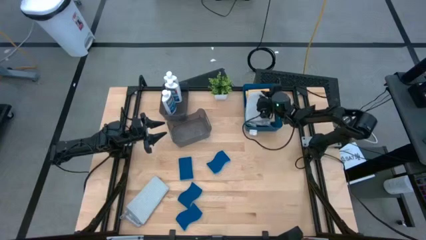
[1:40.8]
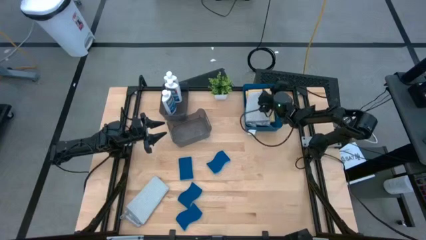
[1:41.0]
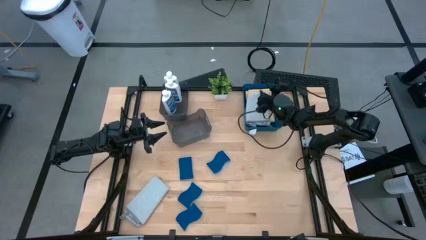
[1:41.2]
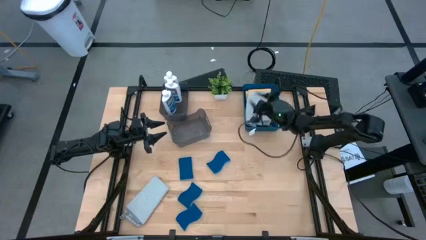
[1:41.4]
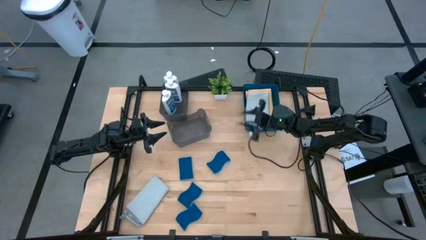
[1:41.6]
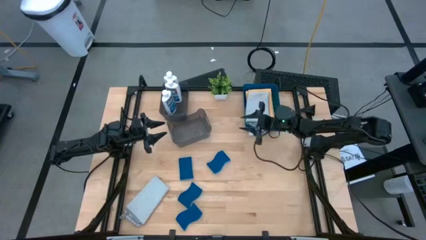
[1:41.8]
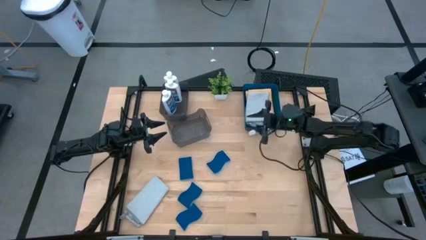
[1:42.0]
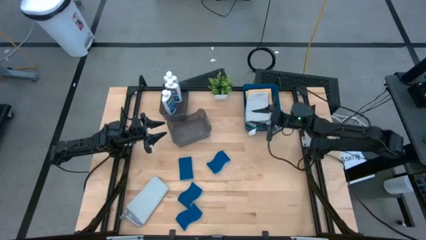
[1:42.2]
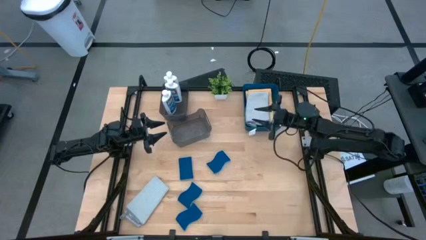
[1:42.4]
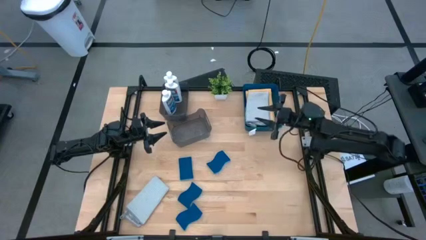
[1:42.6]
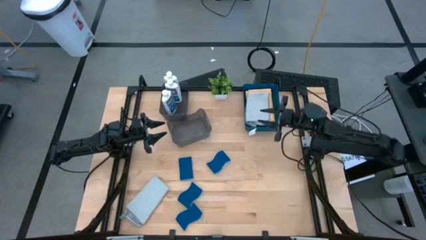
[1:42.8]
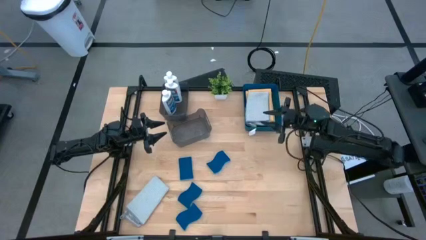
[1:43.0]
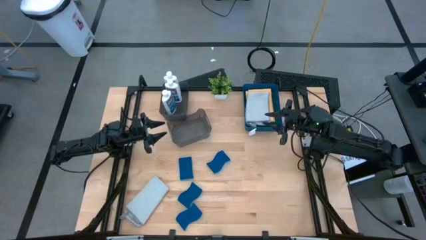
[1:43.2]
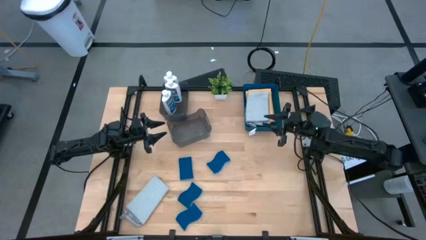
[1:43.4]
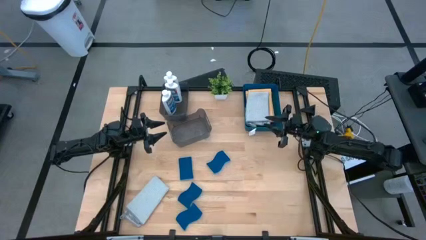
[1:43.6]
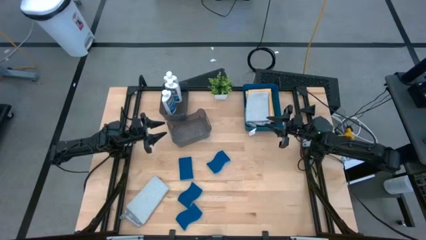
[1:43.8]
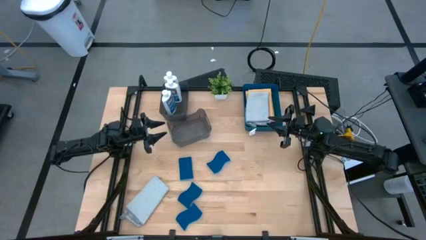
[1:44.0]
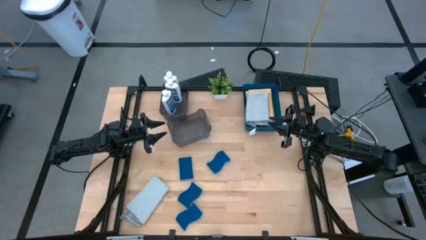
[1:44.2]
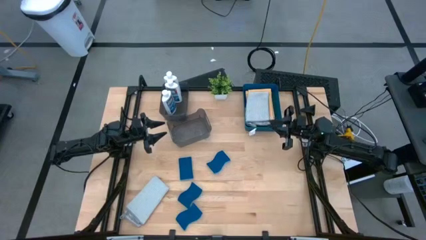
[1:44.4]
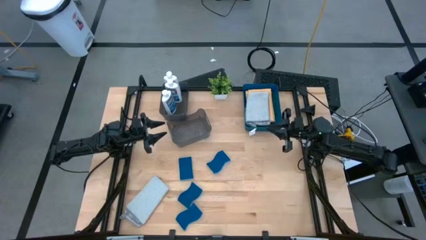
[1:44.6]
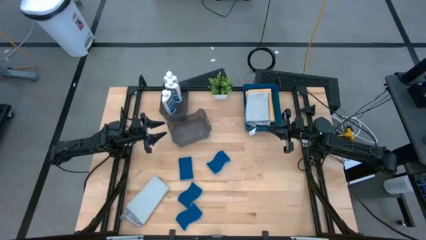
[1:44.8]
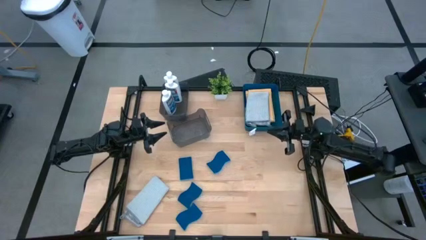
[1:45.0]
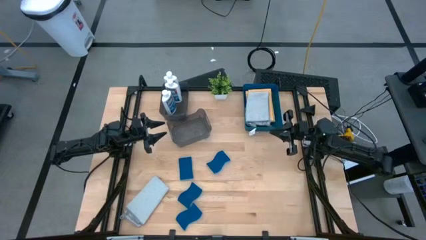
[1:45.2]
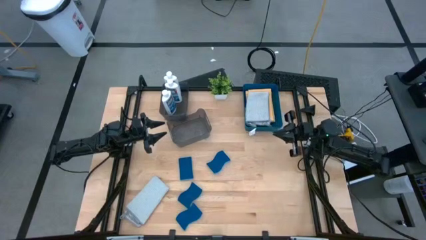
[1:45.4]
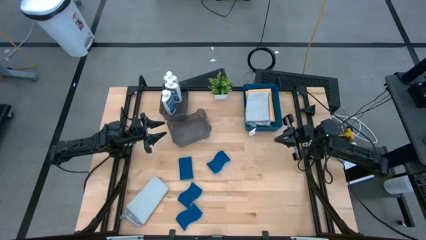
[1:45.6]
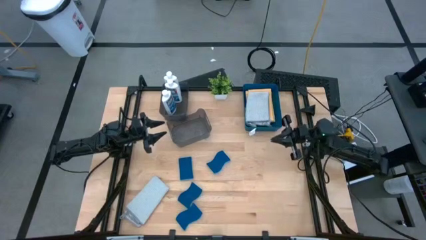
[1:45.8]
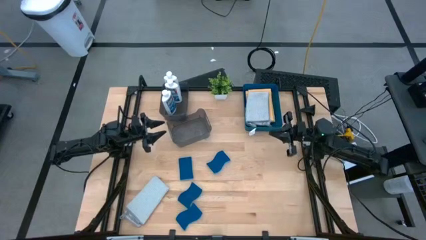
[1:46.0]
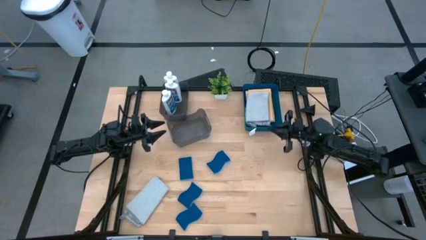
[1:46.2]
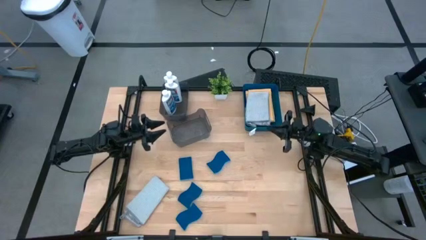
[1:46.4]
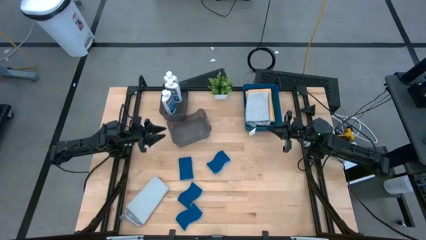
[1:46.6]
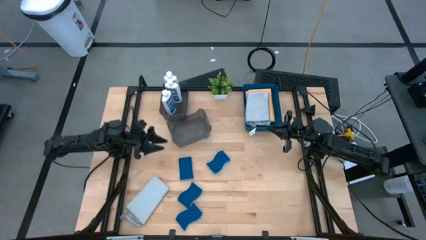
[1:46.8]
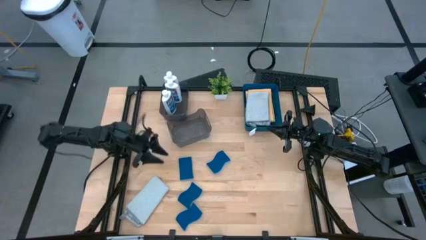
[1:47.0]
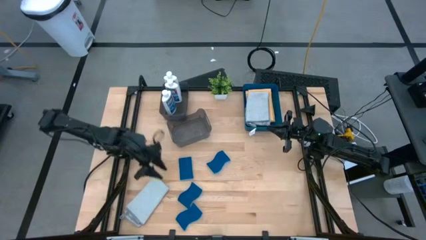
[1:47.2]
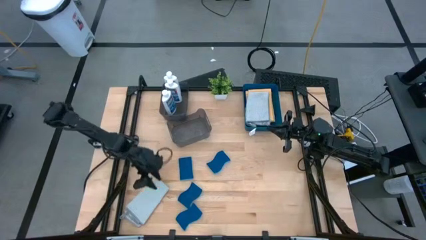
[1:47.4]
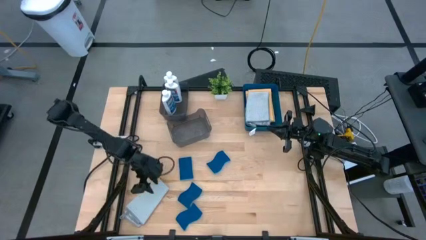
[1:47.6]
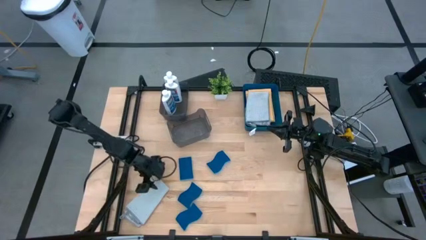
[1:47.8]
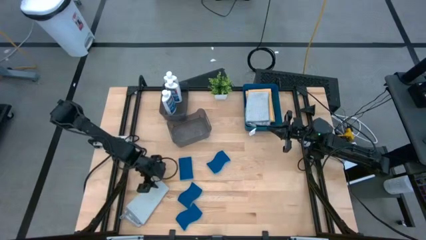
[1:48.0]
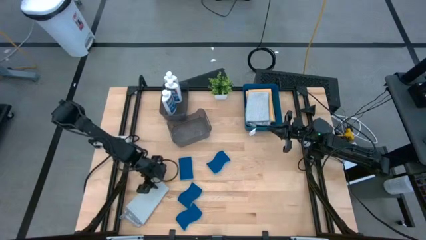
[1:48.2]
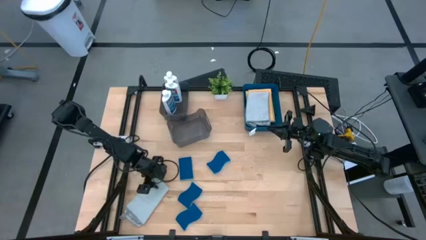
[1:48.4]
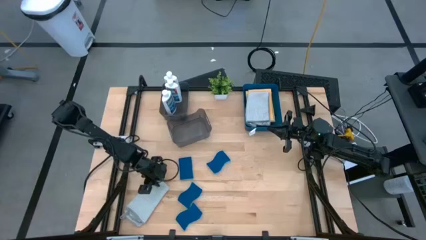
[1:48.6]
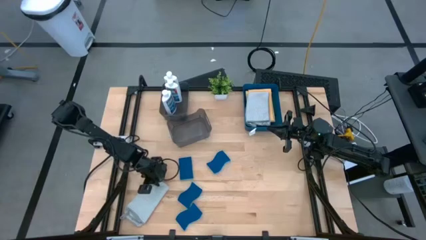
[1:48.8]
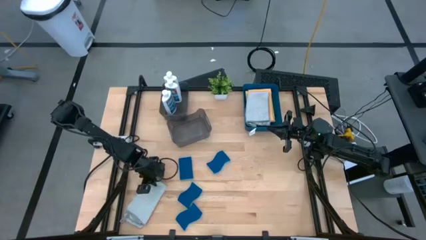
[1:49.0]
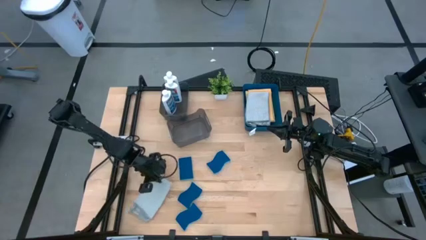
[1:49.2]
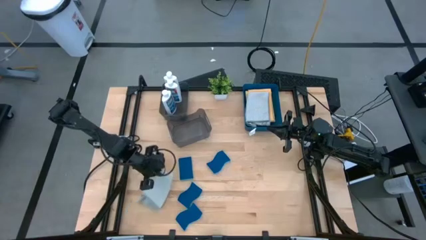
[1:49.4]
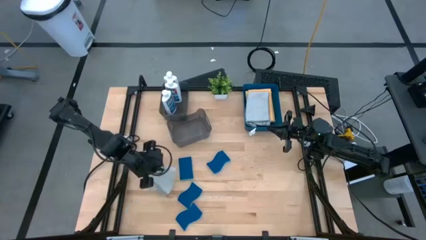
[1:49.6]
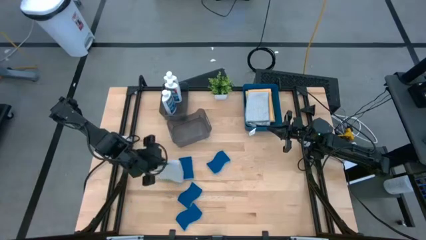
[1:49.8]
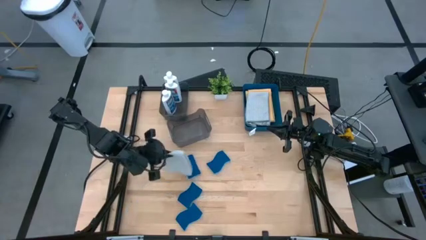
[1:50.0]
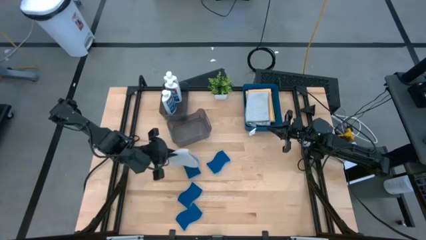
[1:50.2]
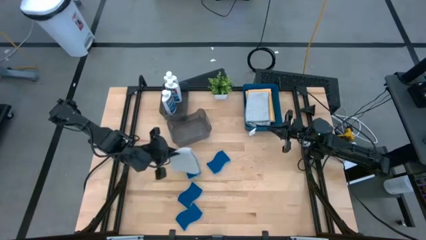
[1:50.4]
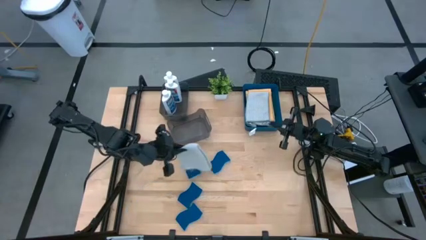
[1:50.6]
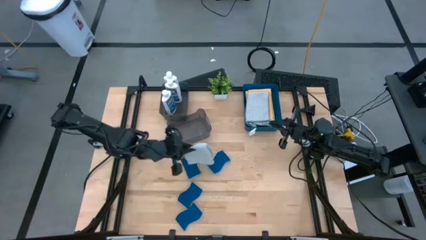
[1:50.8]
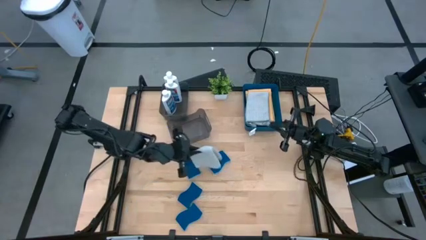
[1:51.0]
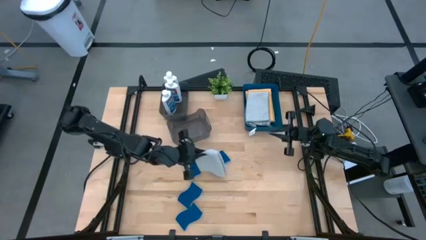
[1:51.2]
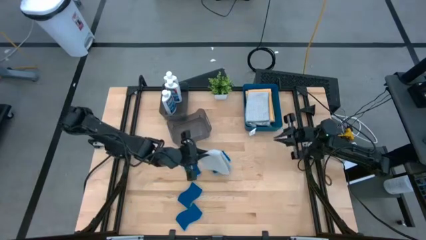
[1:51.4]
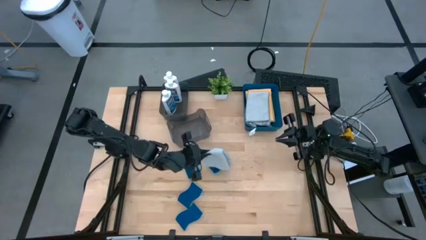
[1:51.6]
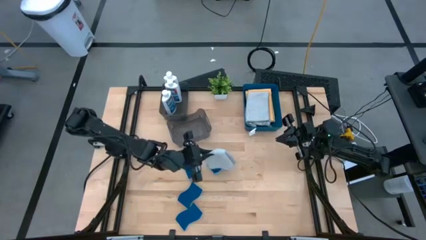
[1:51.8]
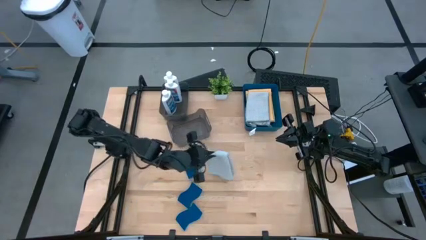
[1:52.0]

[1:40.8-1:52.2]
Task: Pick & Place Kitchen Items
Put the gray towel into the blue bin

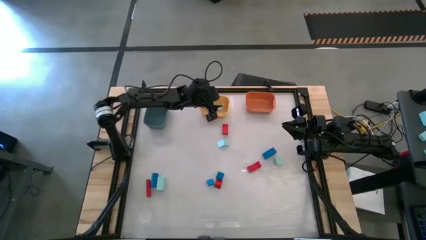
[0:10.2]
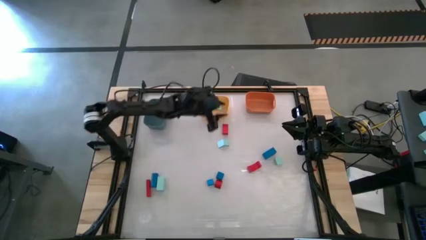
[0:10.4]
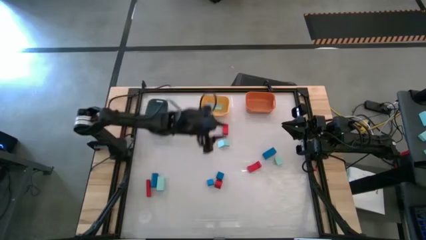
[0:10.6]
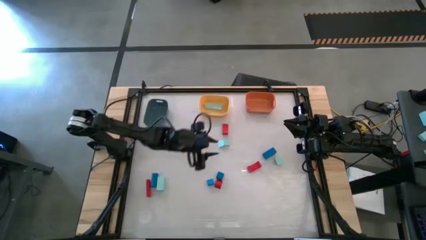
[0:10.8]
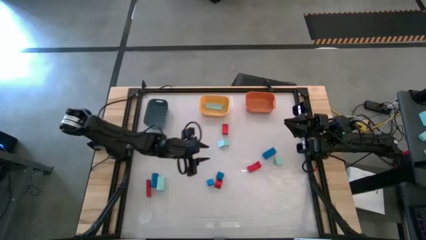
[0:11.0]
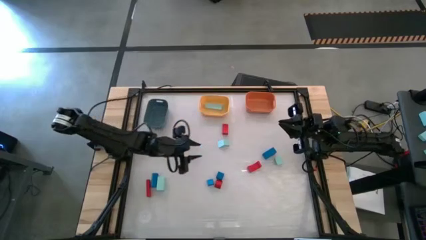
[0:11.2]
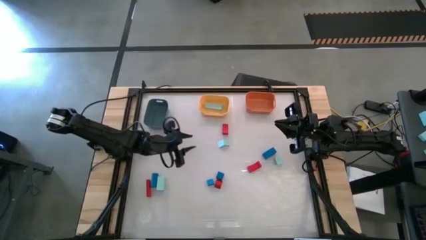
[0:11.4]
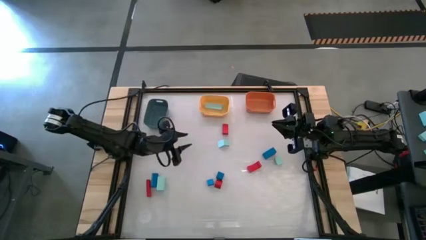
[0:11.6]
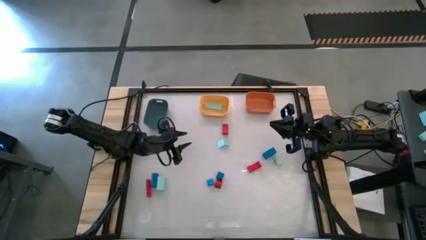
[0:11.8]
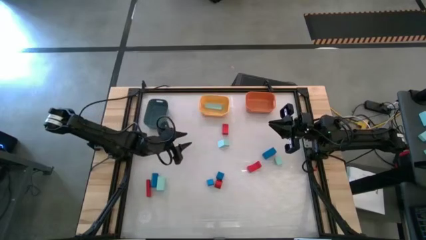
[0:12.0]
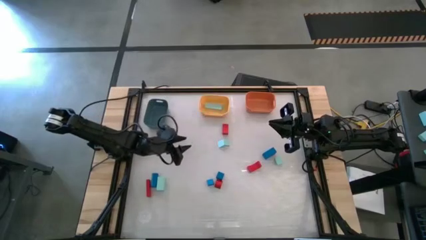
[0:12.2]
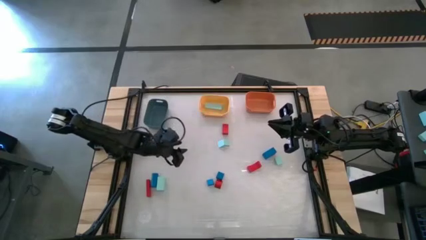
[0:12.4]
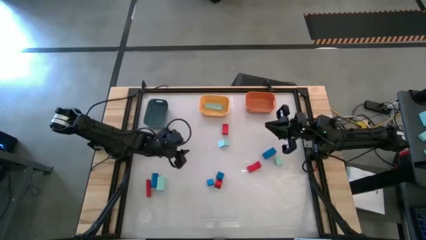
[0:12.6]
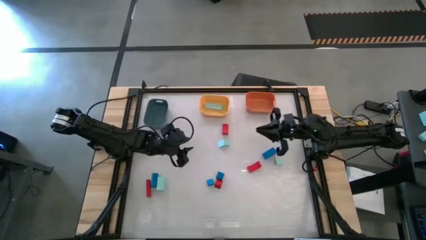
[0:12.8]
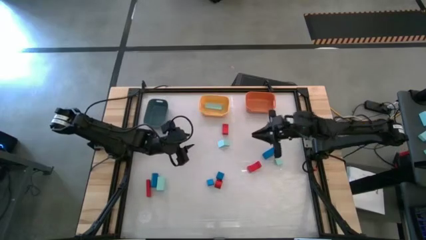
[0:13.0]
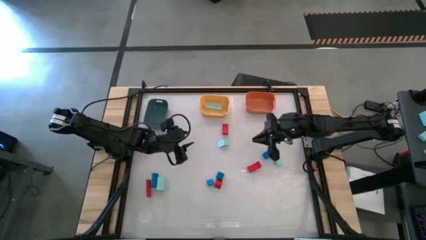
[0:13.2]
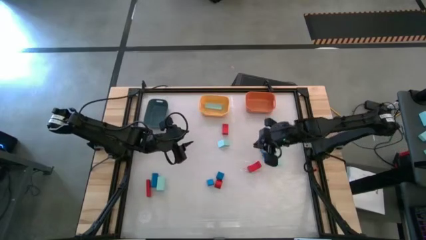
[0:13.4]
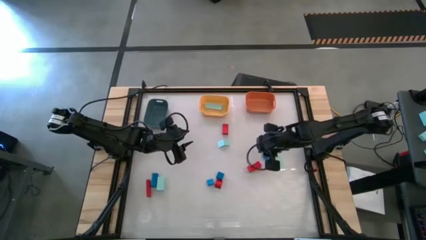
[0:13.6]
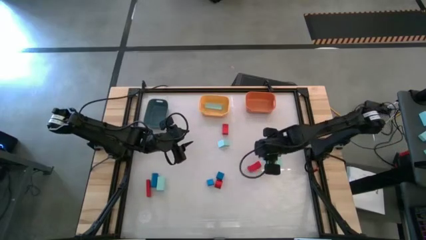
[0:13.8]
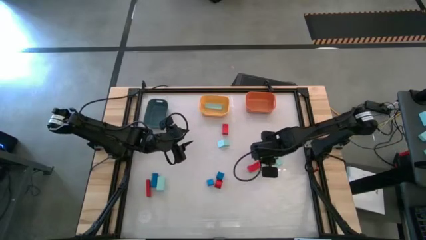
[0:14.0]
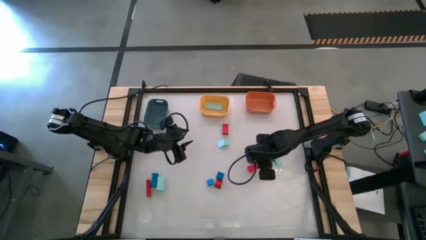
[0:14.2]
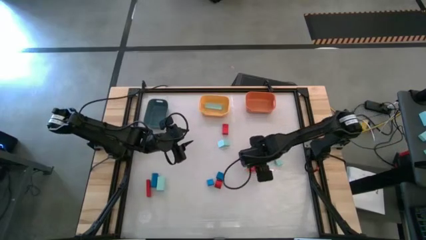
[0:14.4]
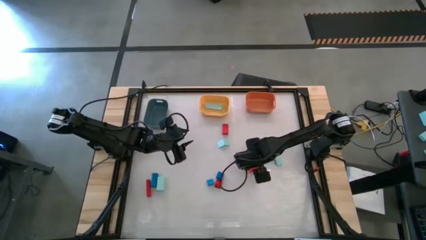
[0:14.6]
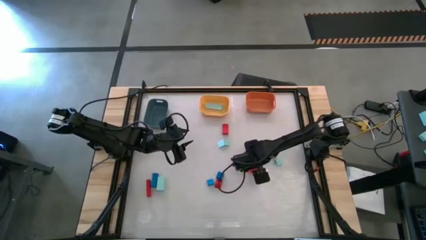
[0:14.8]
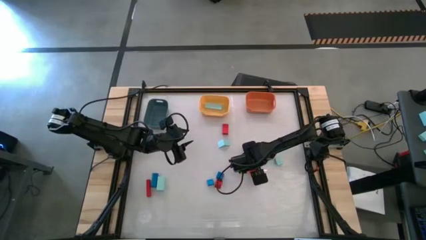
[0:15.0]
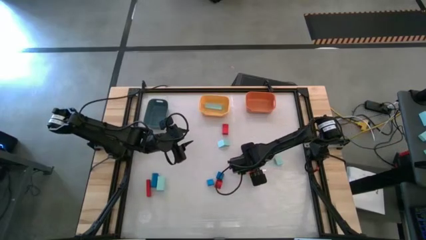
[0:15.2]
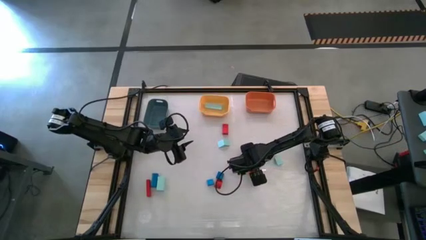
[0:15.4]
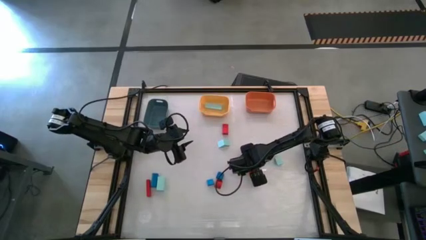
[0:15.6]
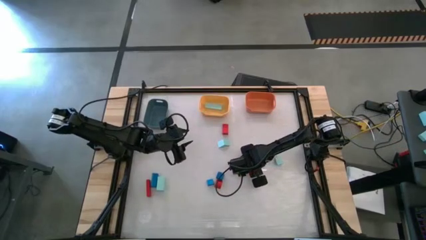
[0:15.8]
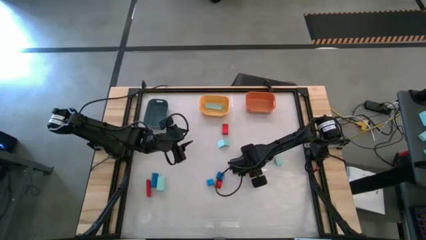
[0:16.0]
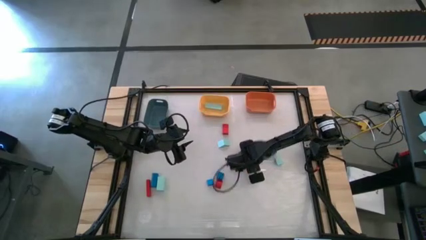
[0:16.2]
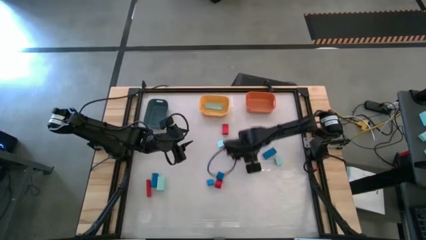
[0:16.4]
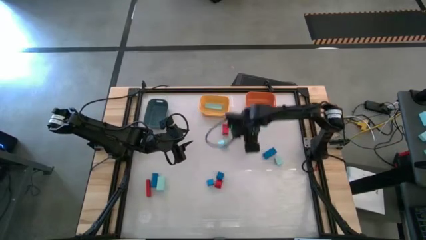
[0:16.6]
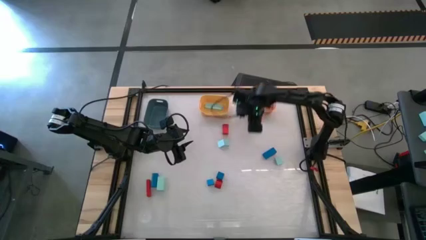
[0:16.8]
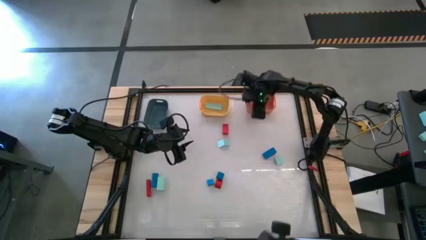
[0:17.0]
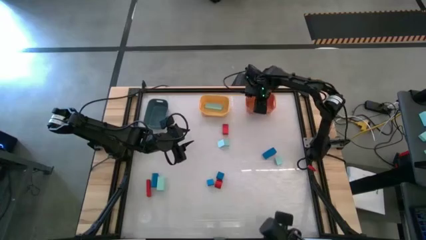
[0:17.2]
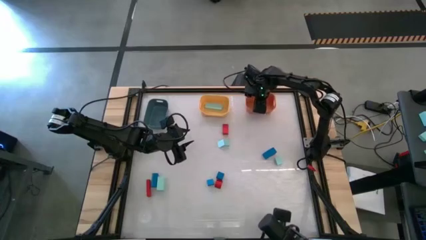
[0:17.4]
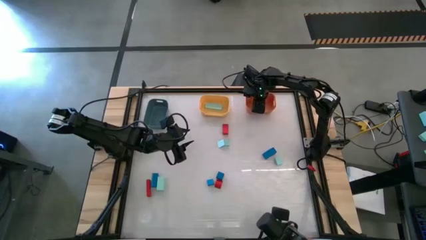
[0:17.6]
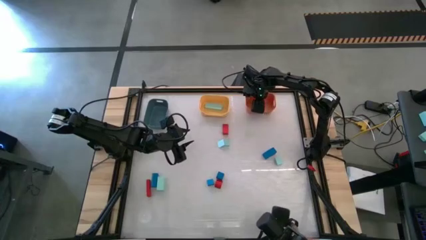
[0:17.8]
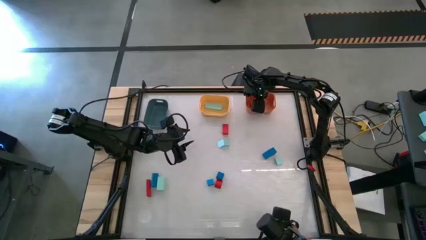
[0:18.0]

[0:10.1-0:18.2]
Task: Sort & place blocks by color
Put the red arch block into the orange bin
